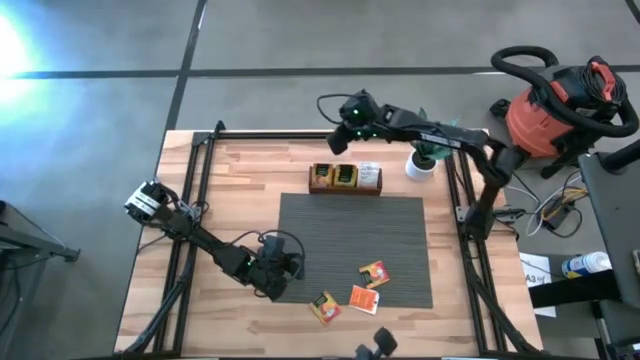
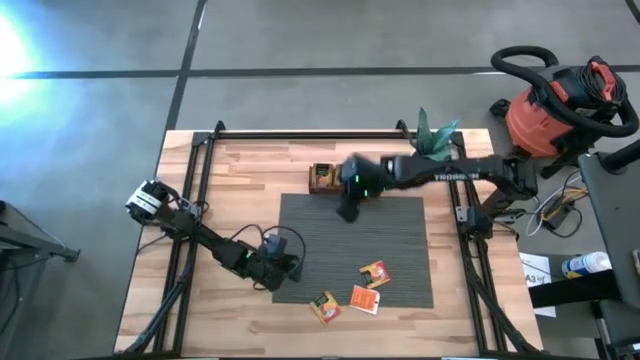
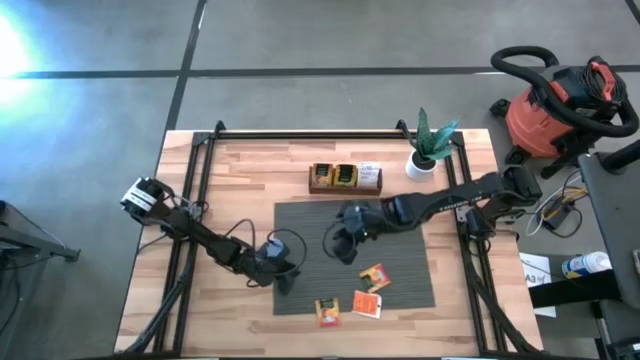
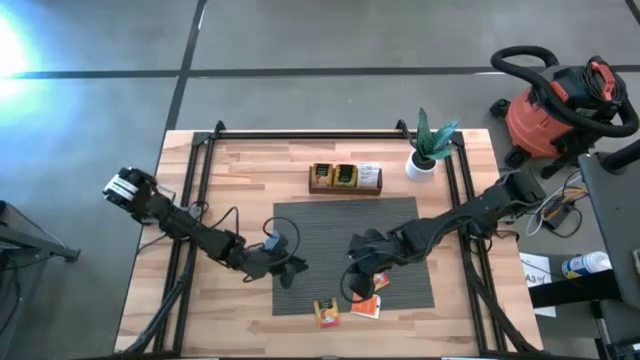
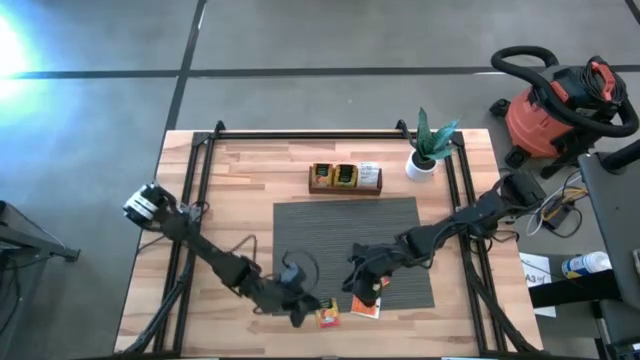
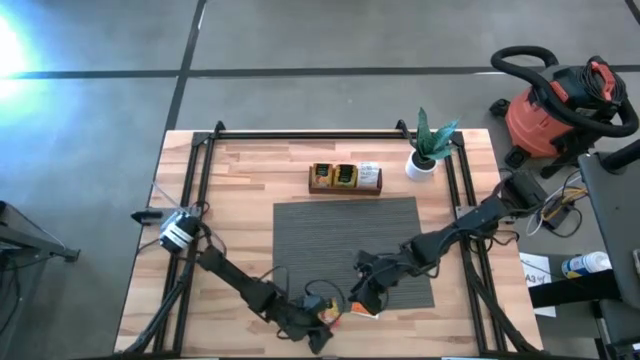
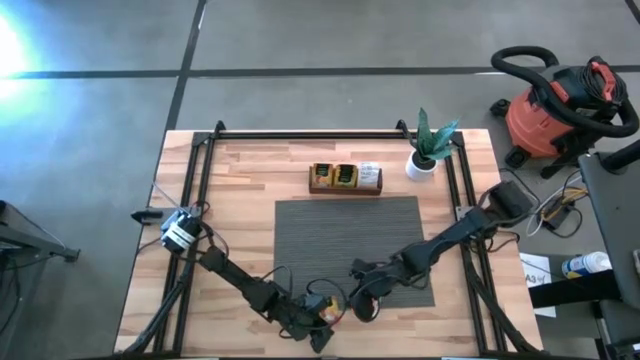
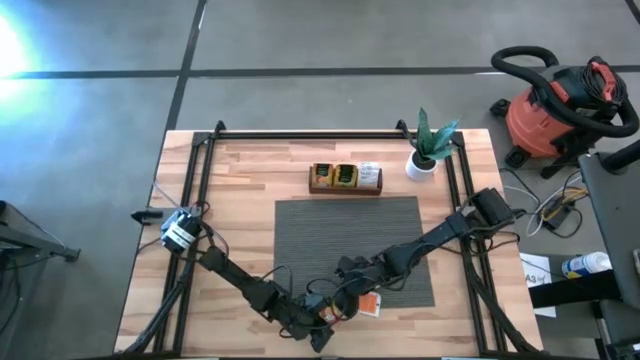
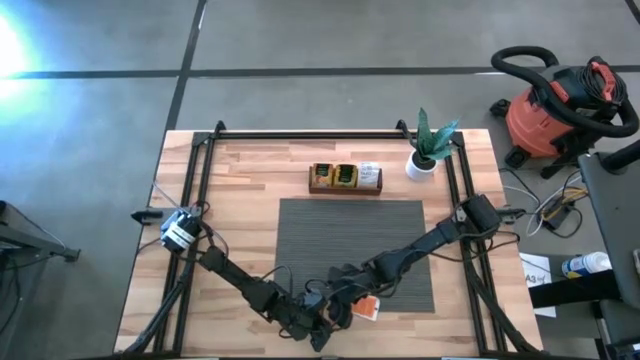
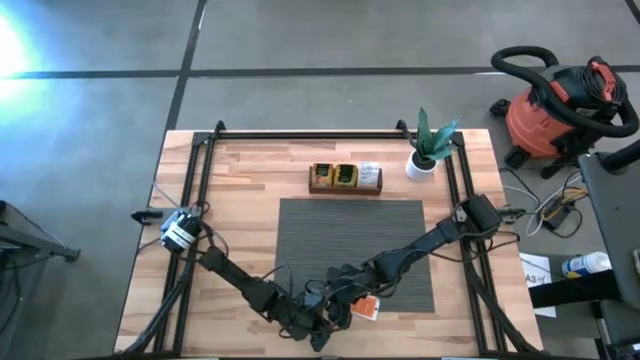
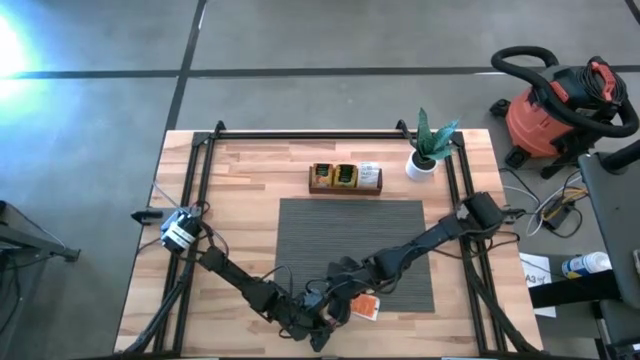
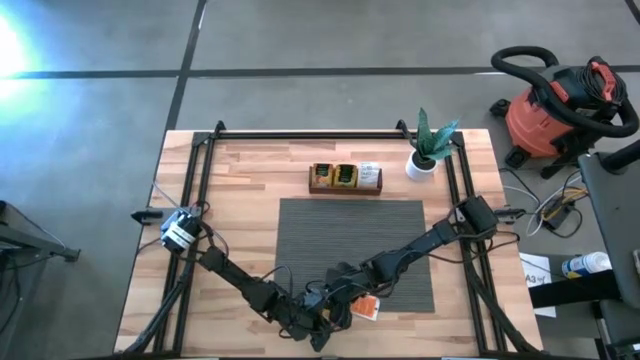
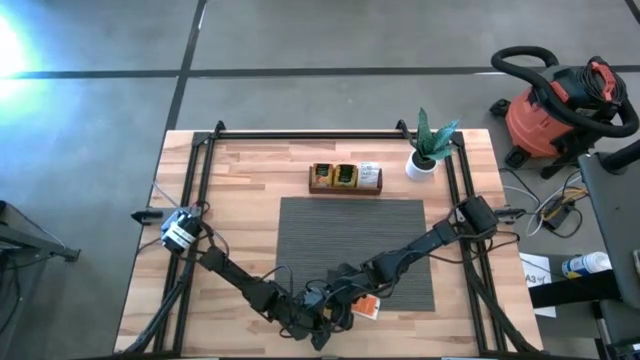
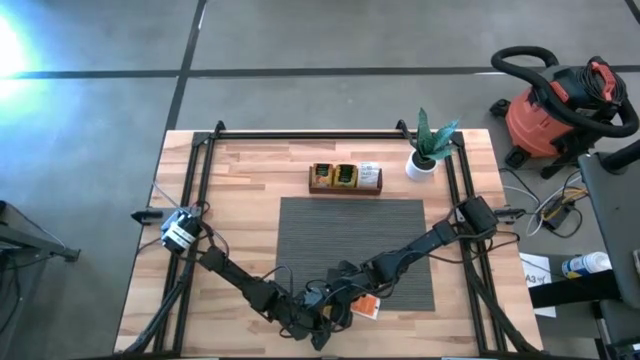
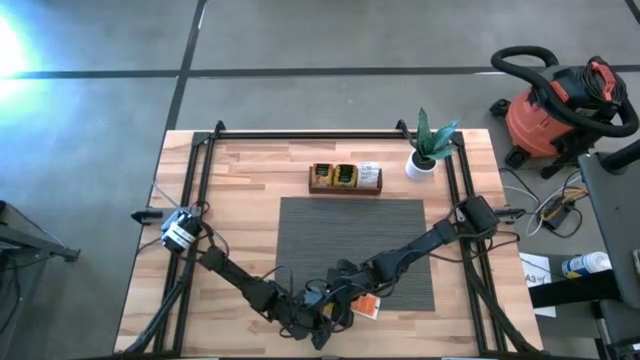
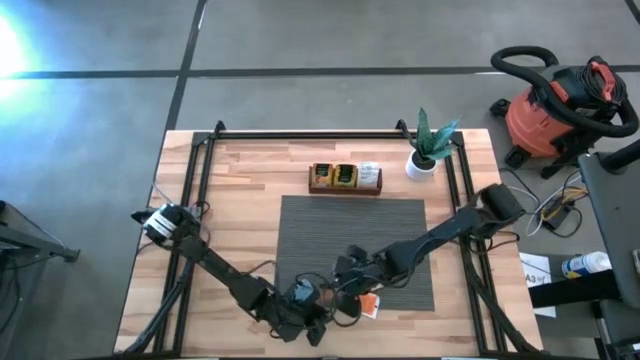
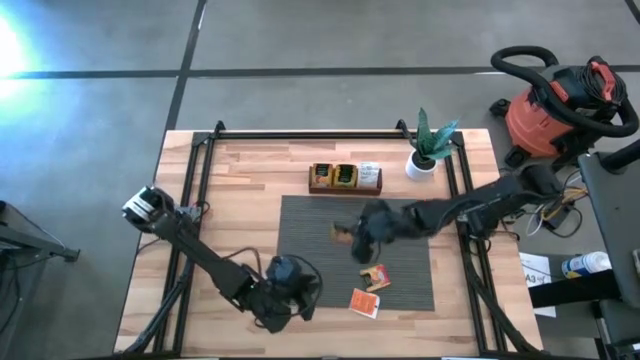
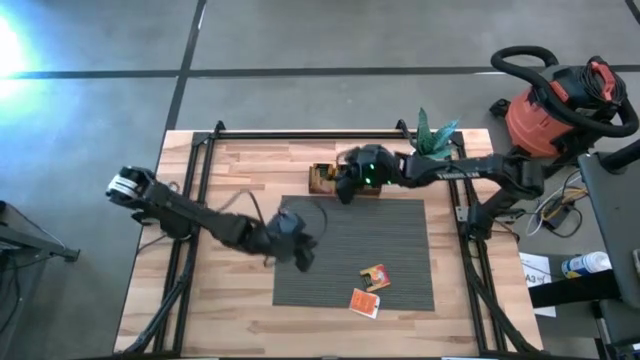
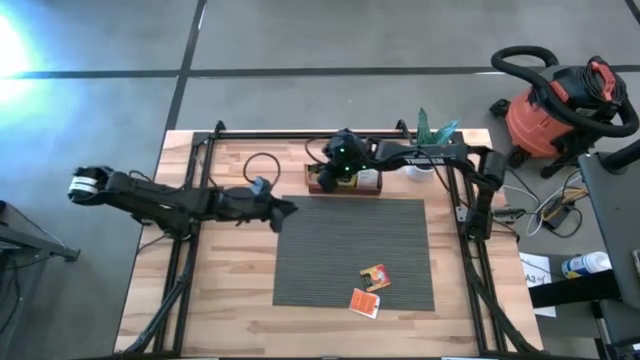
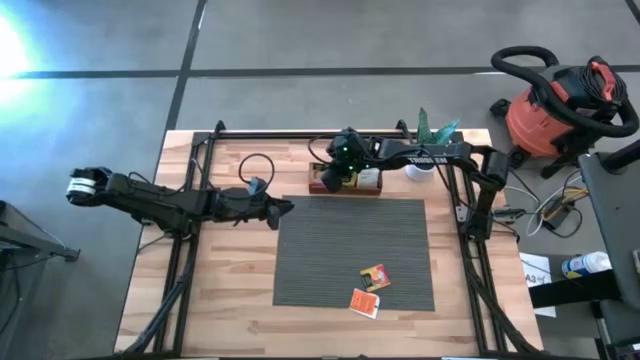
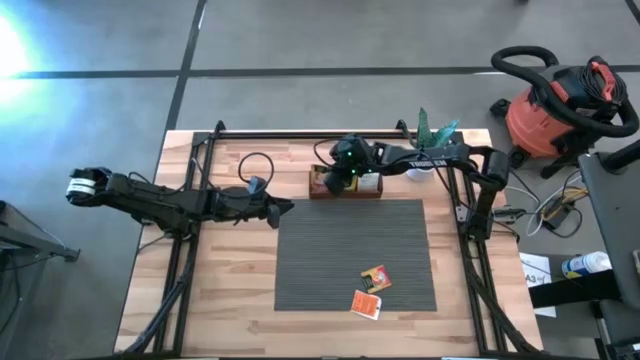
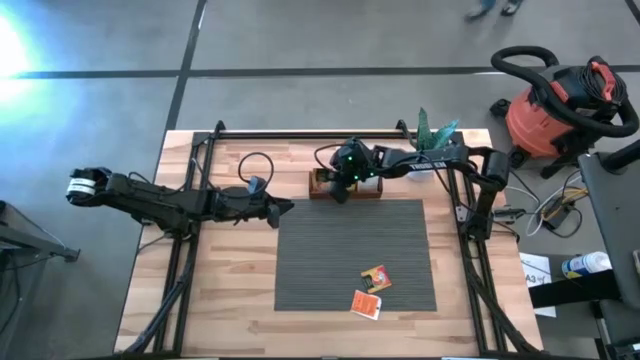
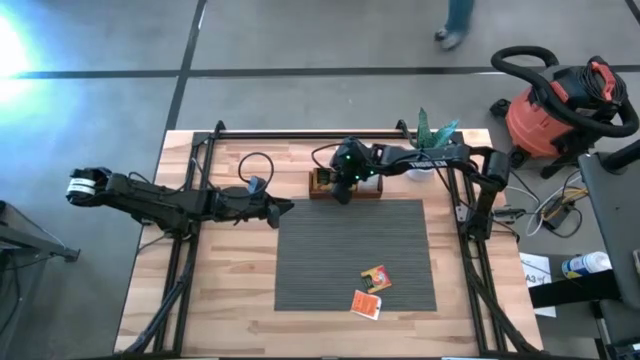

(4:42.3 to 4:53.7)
Task: Pick & Place Tea
Put the orange tea bag into the left section of the wooden organizer

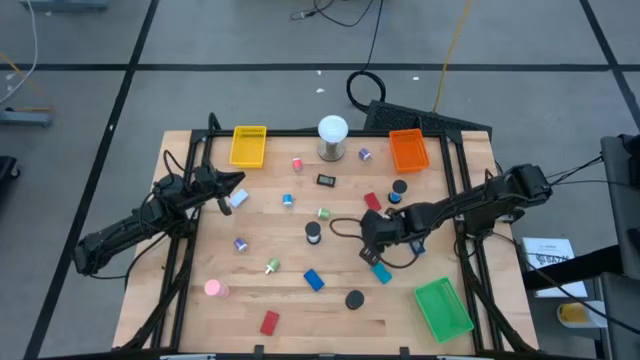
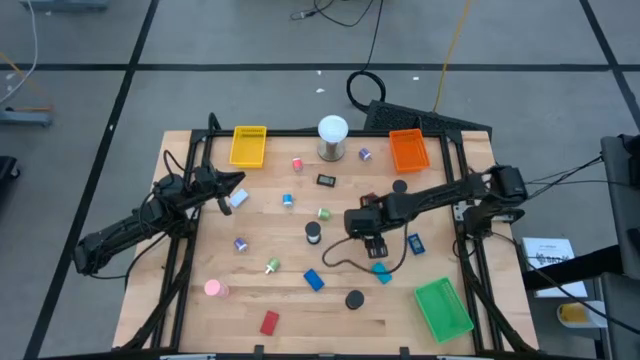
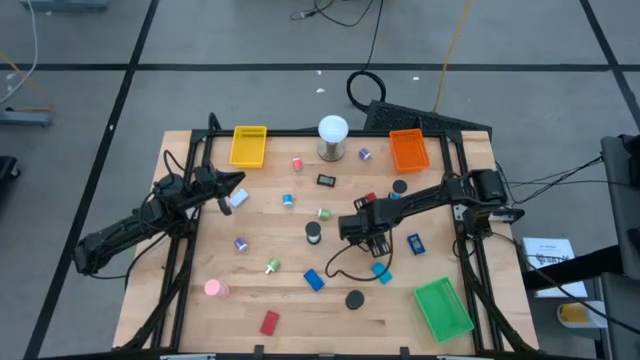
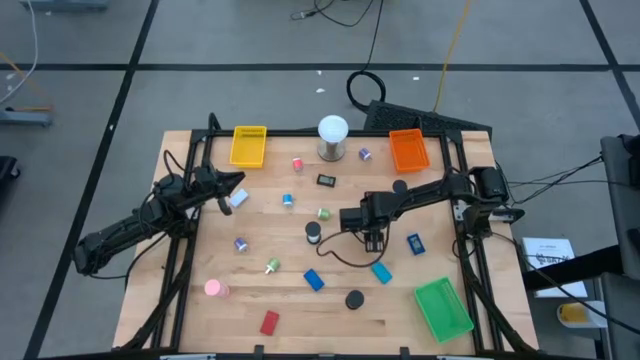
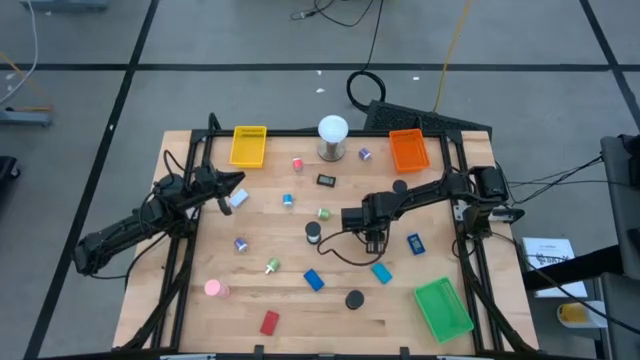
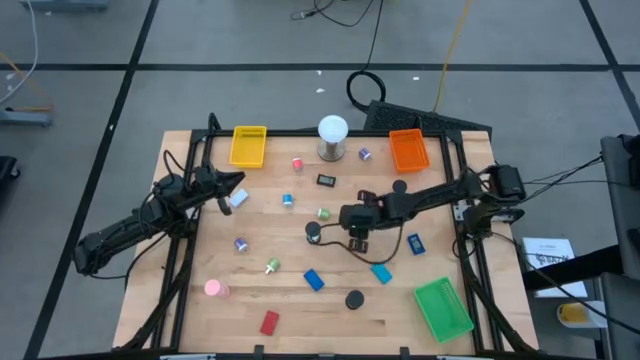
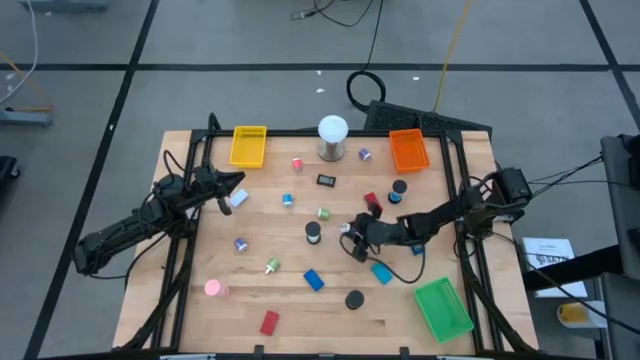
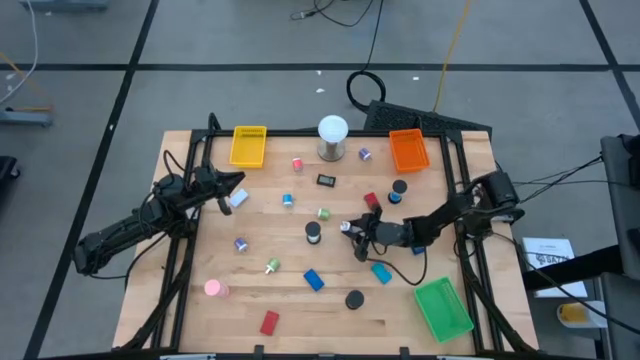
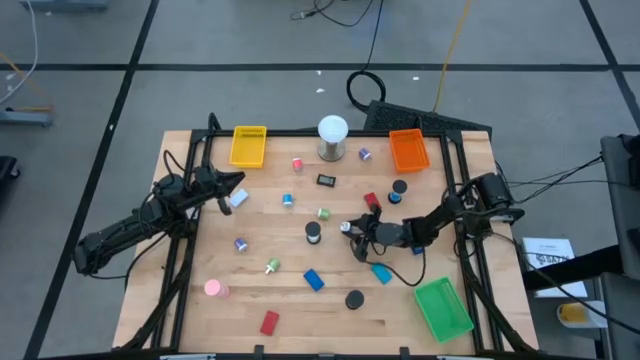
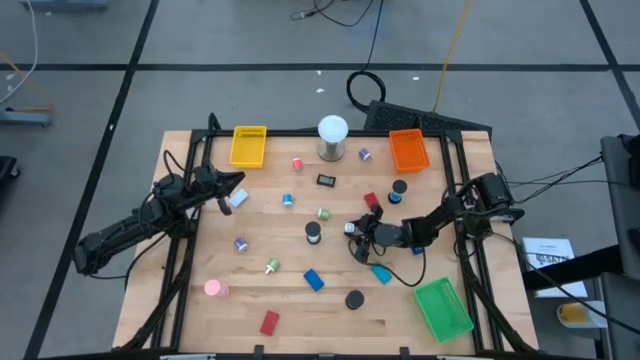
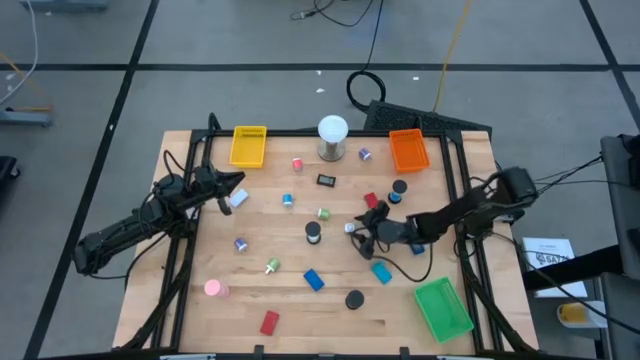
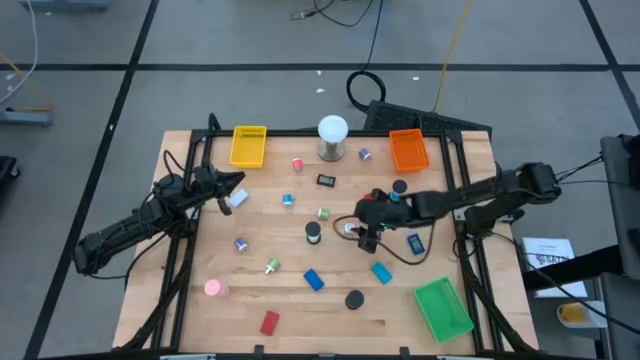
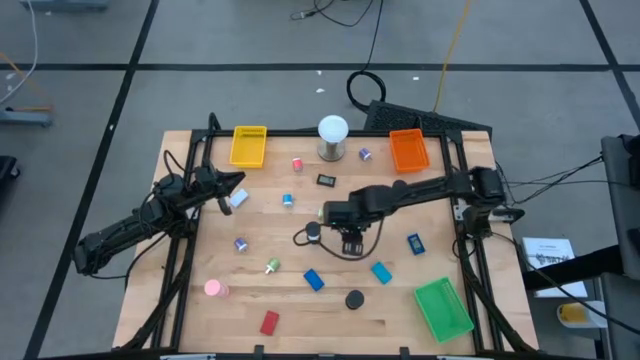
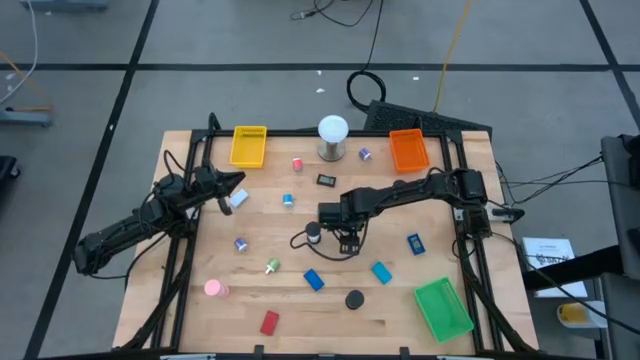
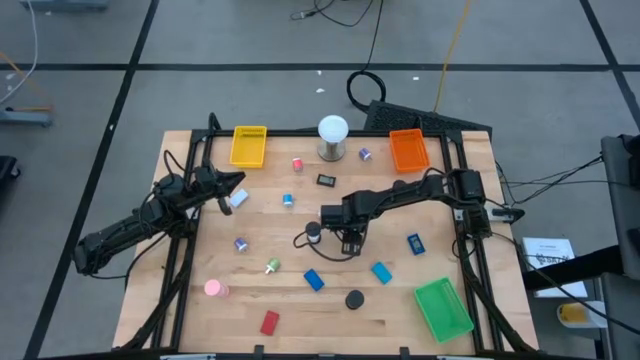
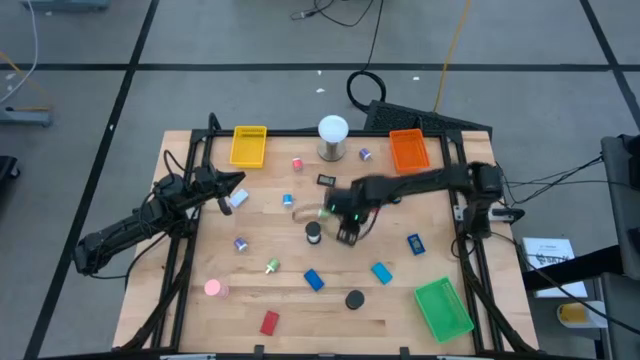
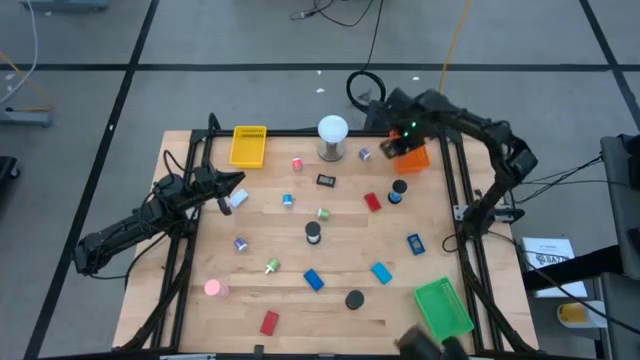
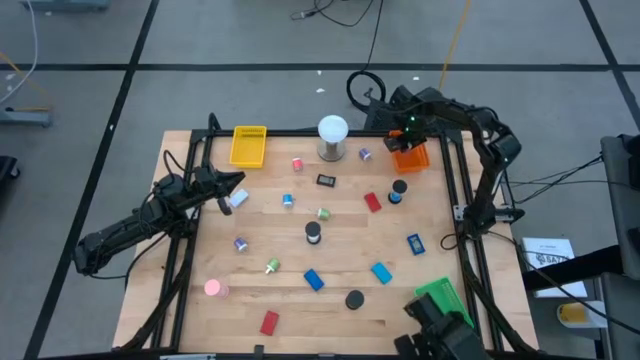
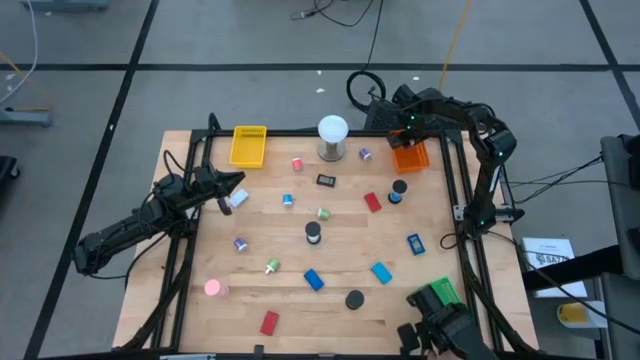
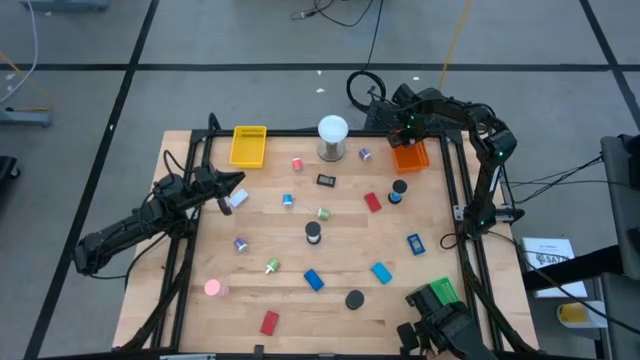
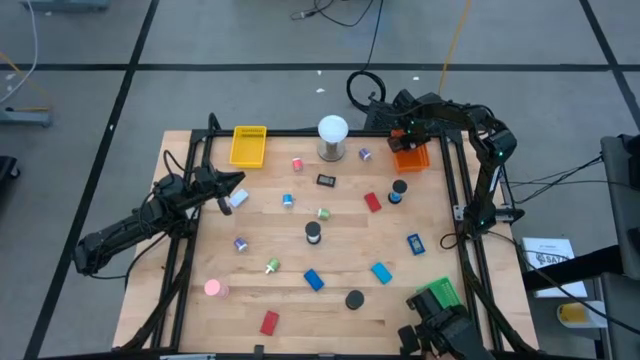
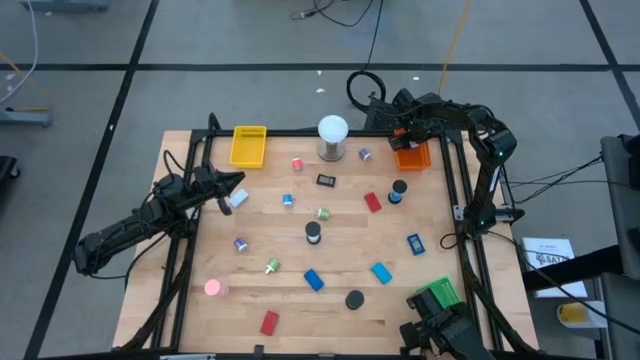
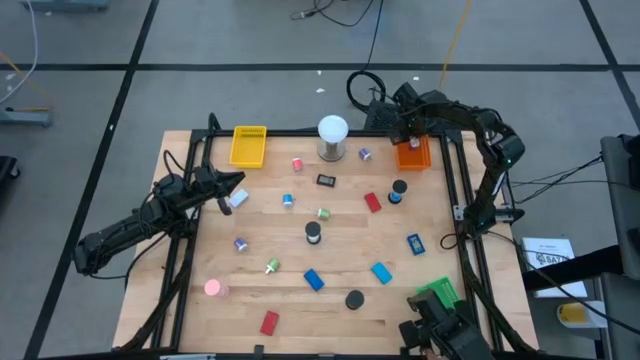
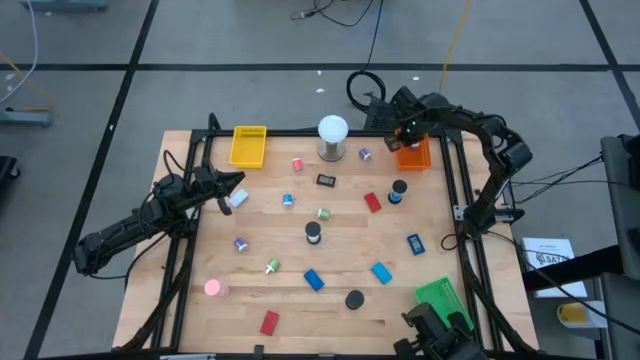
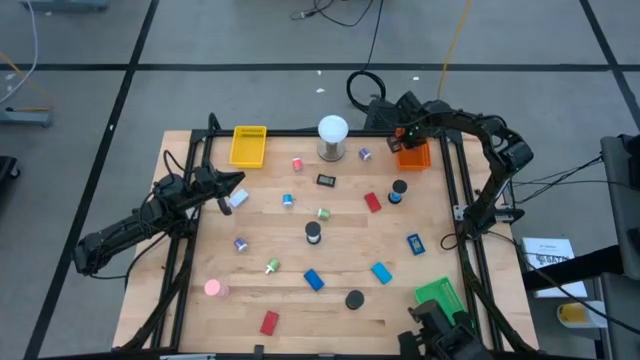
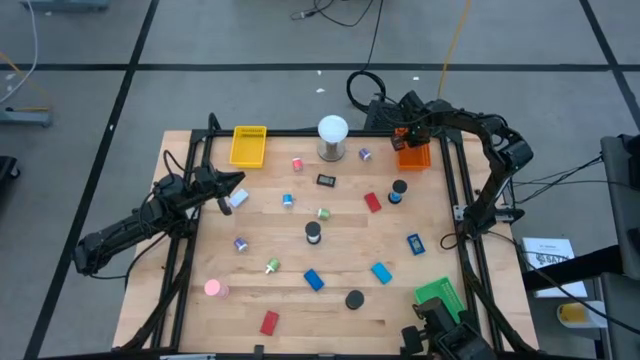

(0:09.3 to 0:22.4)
Task: Pick & Place Office items
Put the bottom right violet charger adaptor into the orange bin
